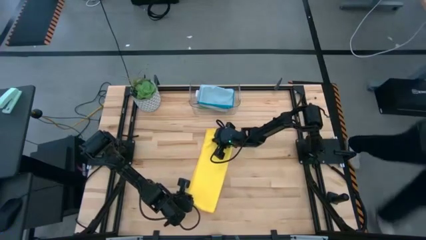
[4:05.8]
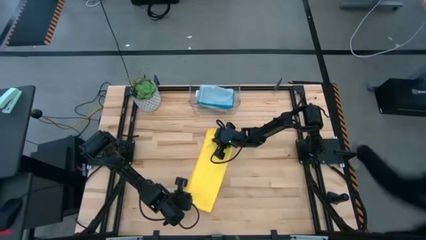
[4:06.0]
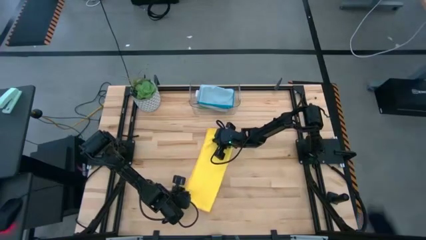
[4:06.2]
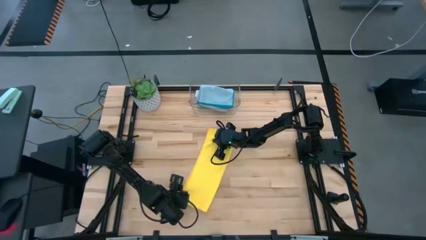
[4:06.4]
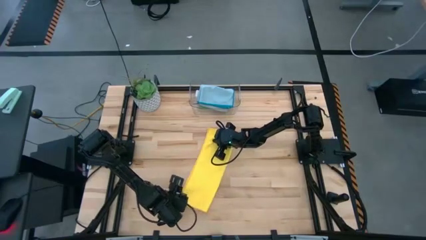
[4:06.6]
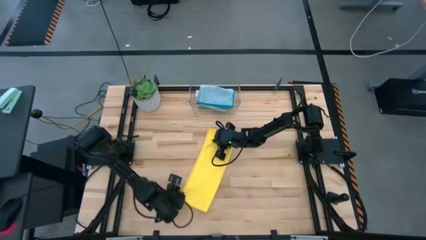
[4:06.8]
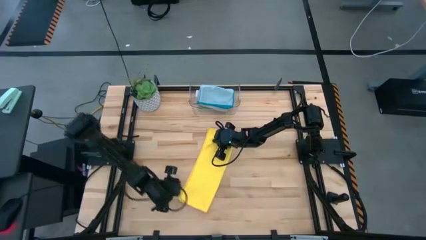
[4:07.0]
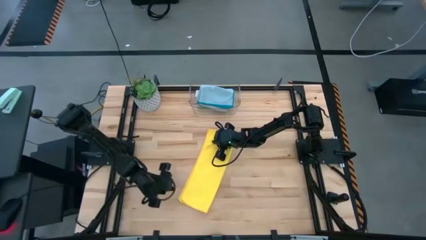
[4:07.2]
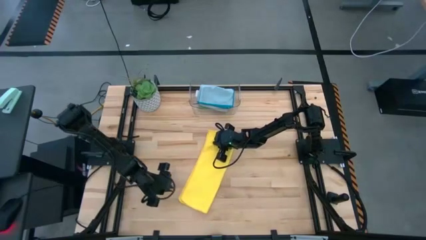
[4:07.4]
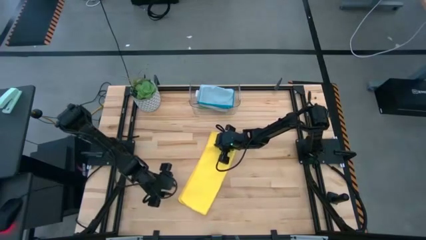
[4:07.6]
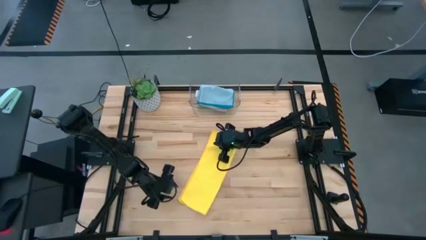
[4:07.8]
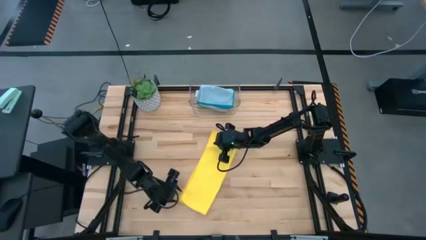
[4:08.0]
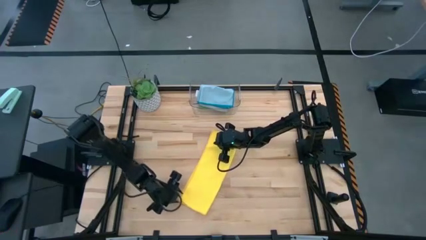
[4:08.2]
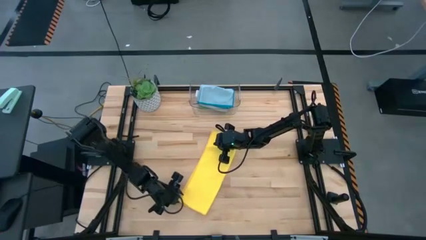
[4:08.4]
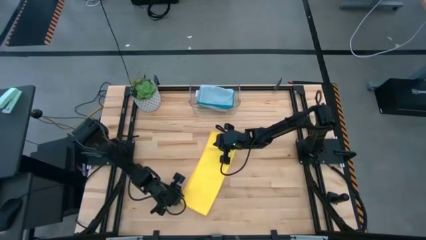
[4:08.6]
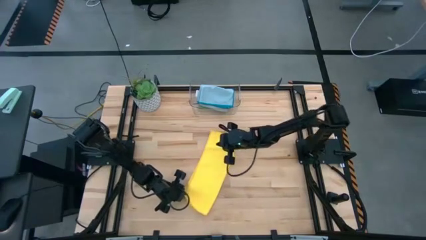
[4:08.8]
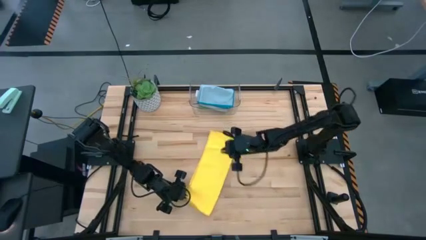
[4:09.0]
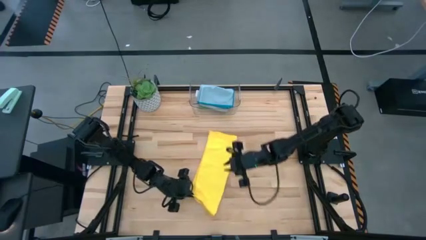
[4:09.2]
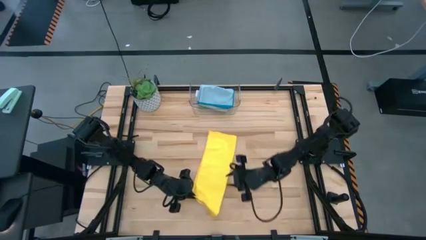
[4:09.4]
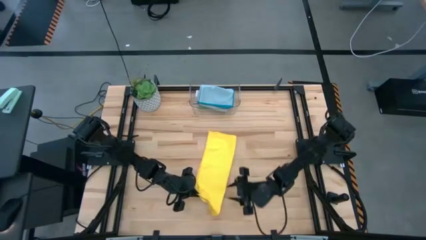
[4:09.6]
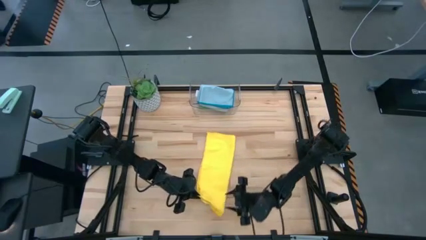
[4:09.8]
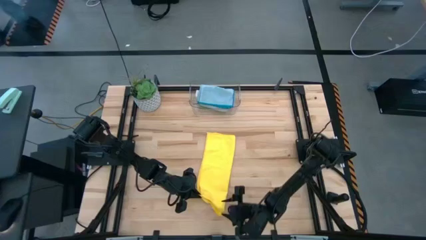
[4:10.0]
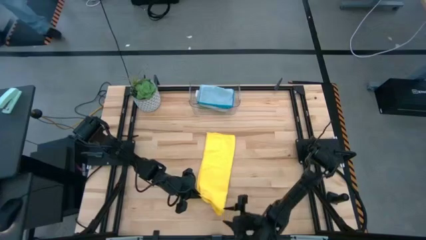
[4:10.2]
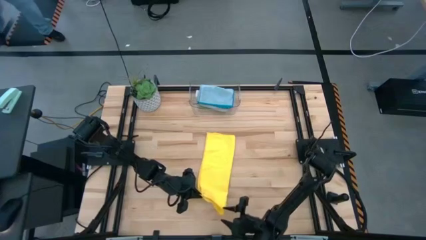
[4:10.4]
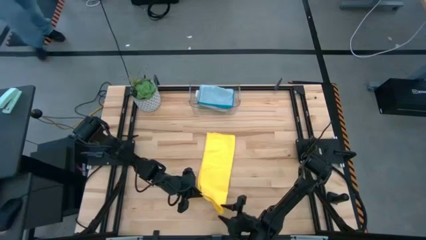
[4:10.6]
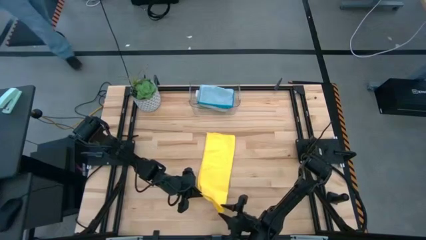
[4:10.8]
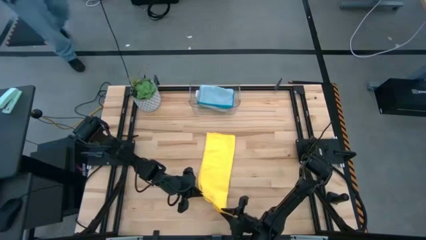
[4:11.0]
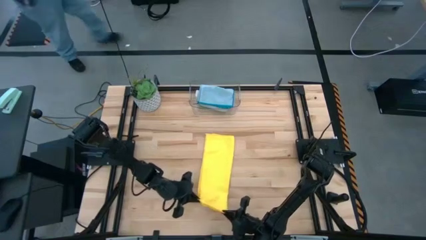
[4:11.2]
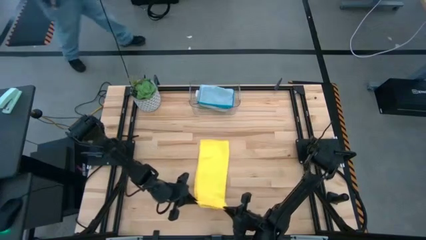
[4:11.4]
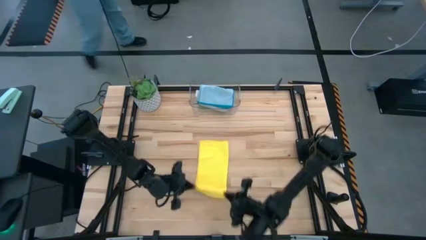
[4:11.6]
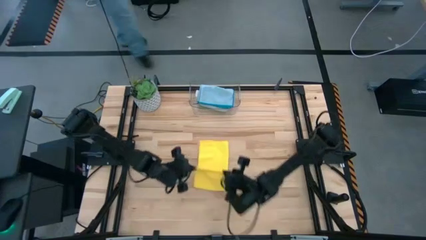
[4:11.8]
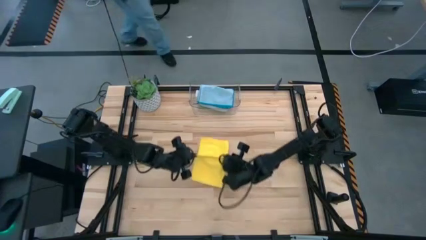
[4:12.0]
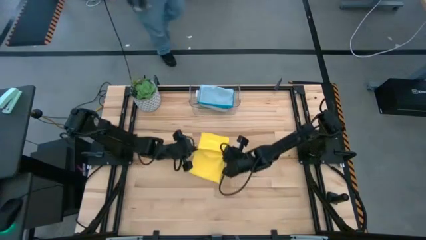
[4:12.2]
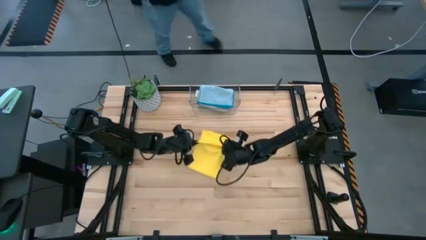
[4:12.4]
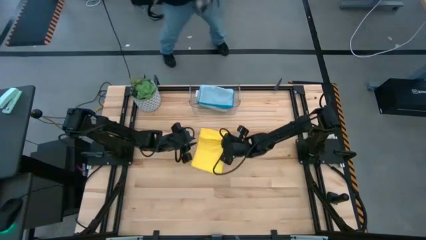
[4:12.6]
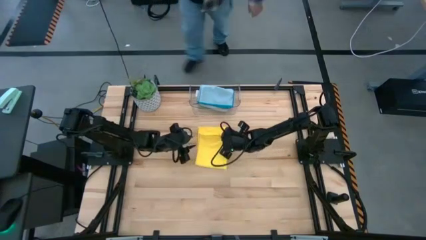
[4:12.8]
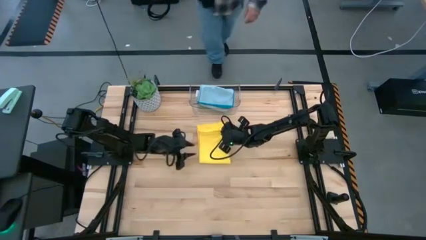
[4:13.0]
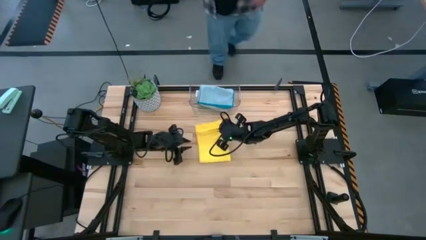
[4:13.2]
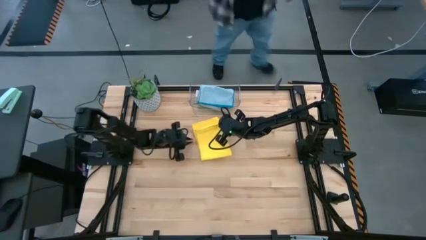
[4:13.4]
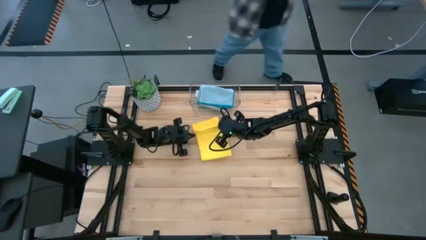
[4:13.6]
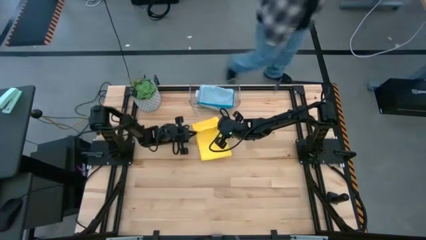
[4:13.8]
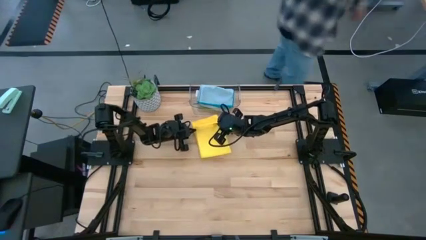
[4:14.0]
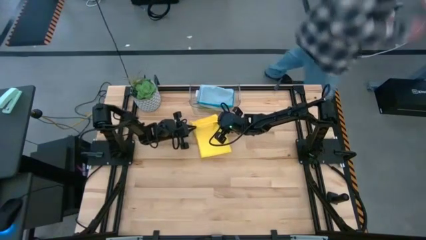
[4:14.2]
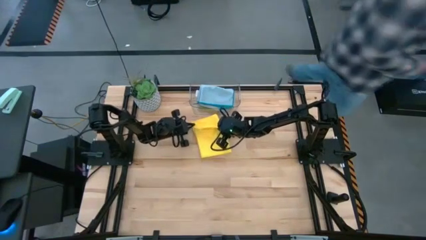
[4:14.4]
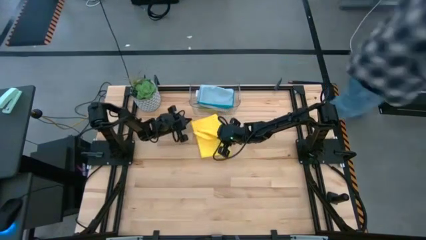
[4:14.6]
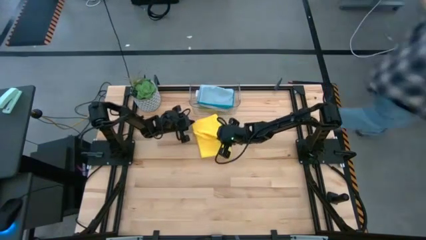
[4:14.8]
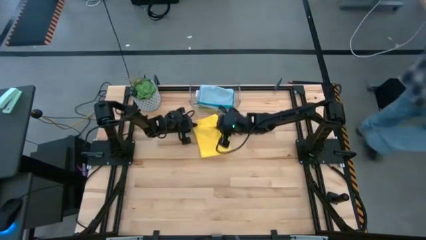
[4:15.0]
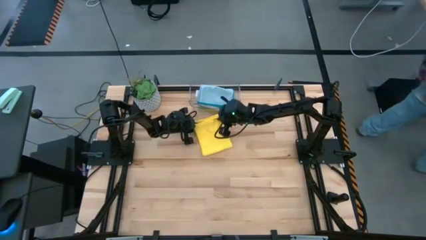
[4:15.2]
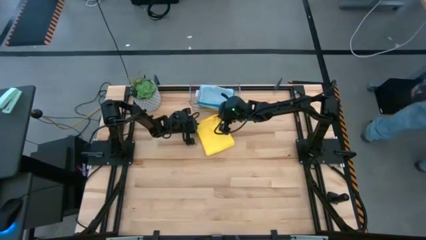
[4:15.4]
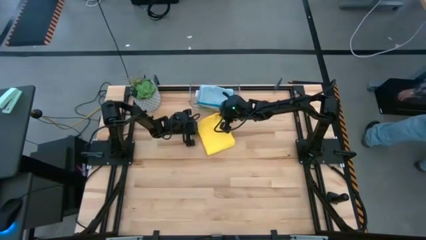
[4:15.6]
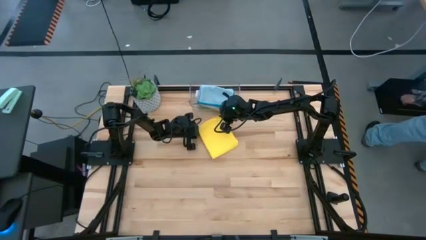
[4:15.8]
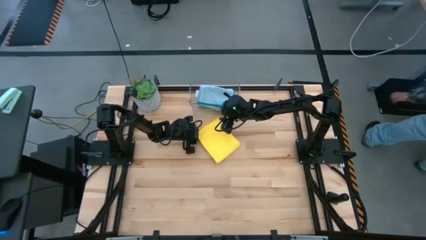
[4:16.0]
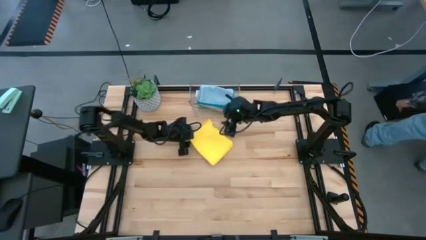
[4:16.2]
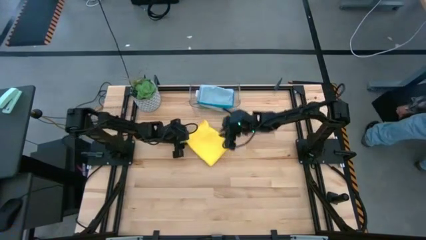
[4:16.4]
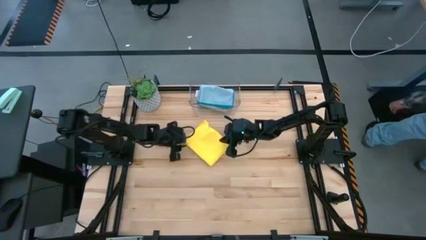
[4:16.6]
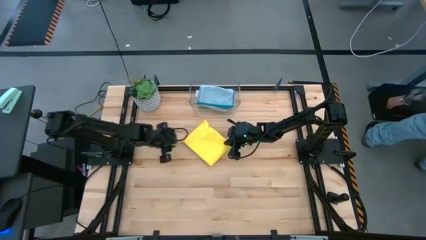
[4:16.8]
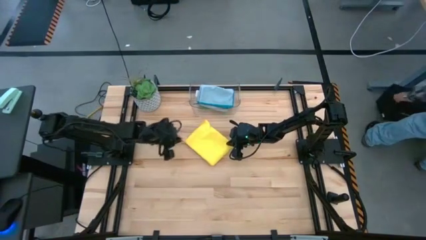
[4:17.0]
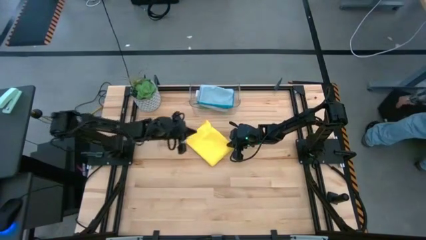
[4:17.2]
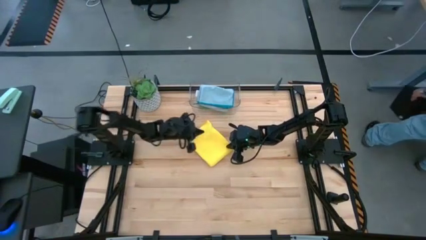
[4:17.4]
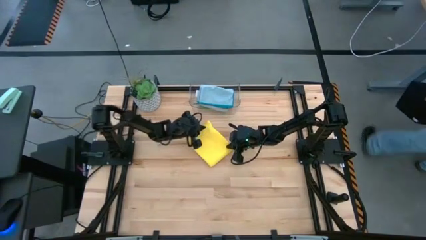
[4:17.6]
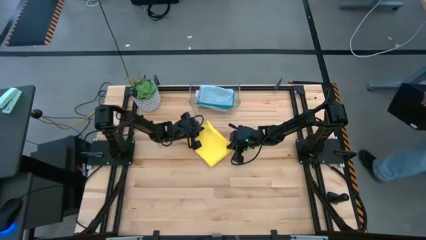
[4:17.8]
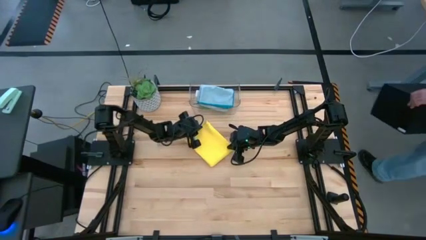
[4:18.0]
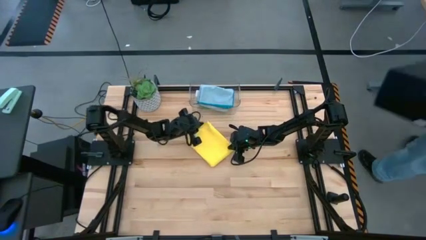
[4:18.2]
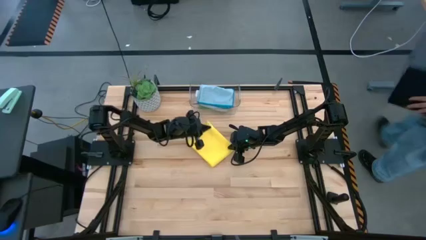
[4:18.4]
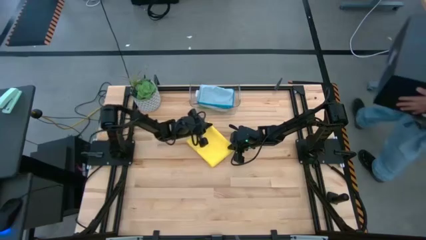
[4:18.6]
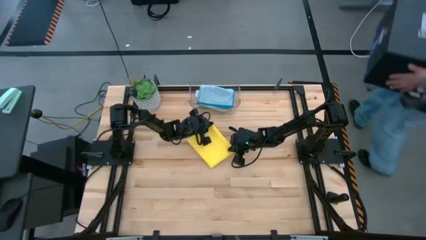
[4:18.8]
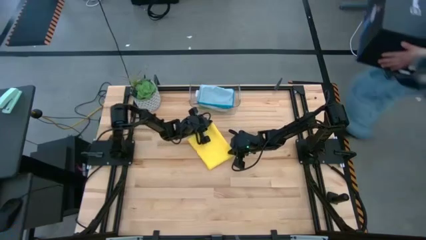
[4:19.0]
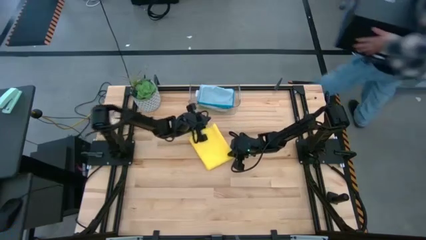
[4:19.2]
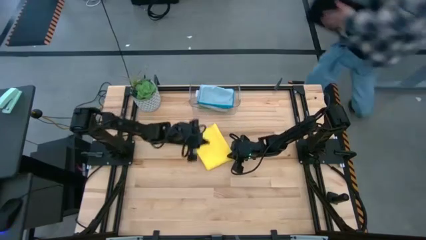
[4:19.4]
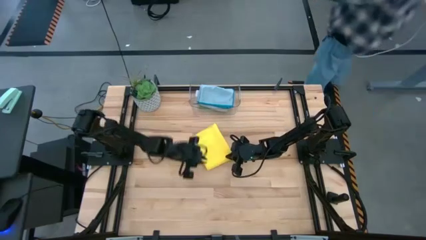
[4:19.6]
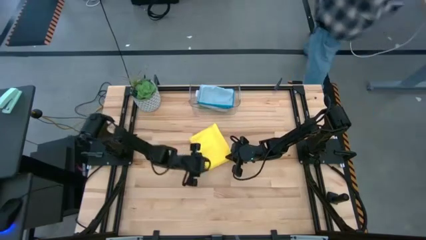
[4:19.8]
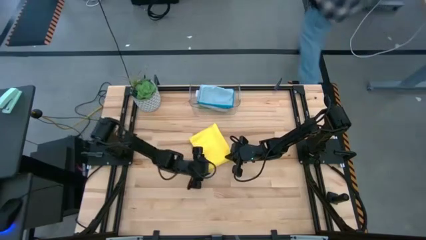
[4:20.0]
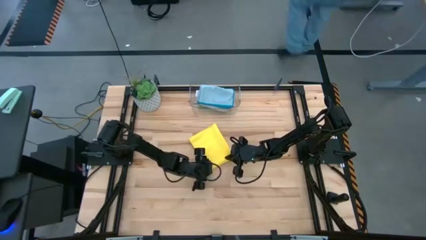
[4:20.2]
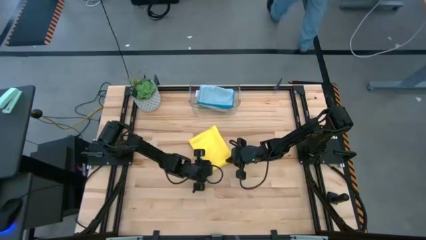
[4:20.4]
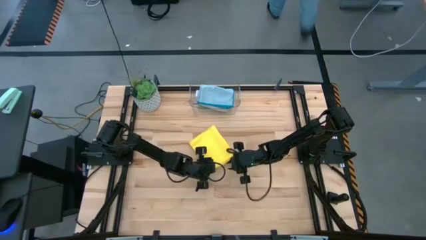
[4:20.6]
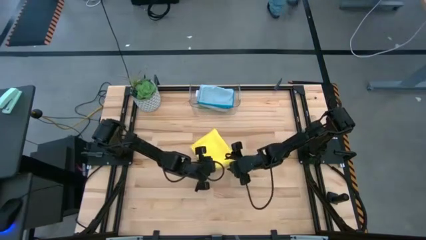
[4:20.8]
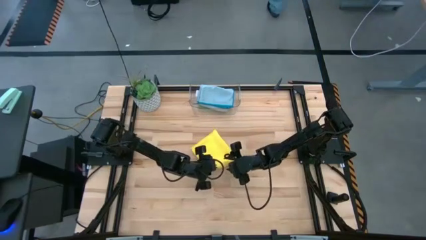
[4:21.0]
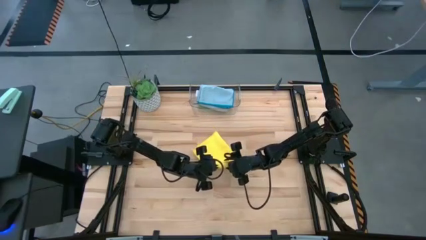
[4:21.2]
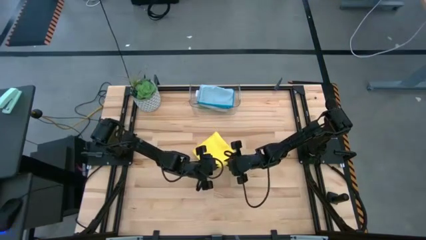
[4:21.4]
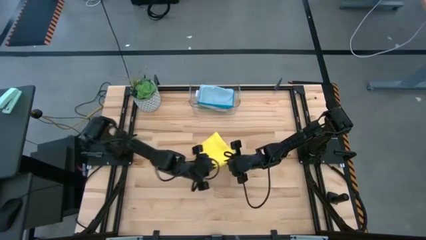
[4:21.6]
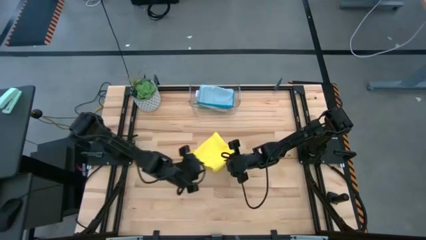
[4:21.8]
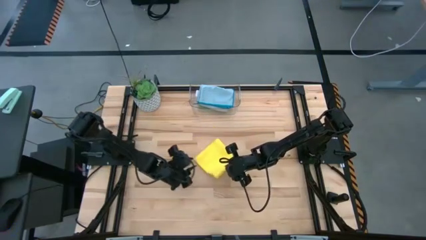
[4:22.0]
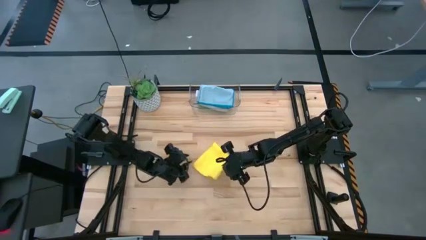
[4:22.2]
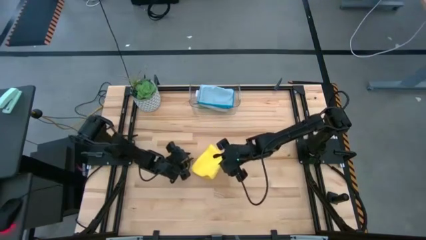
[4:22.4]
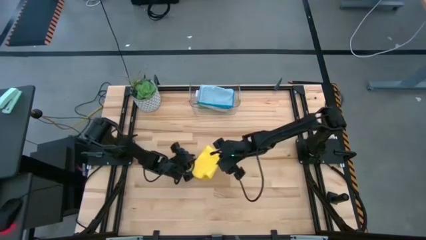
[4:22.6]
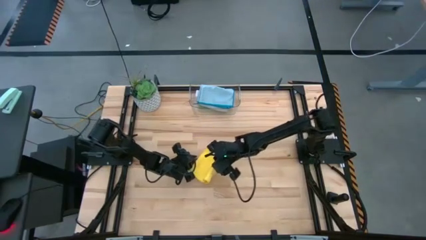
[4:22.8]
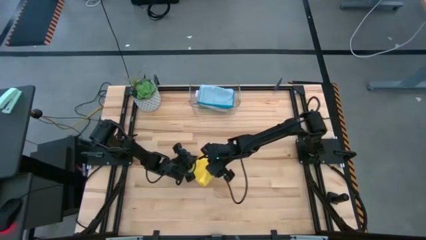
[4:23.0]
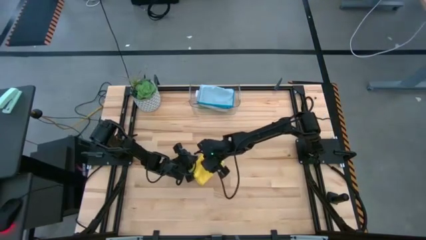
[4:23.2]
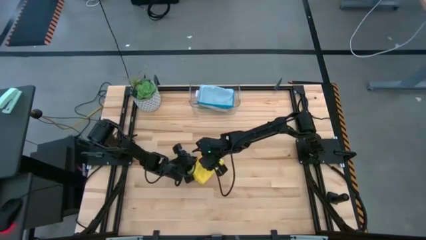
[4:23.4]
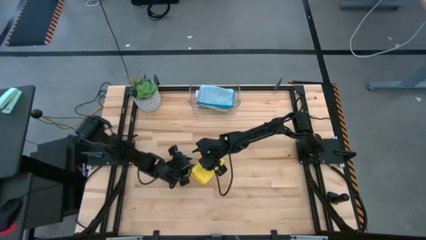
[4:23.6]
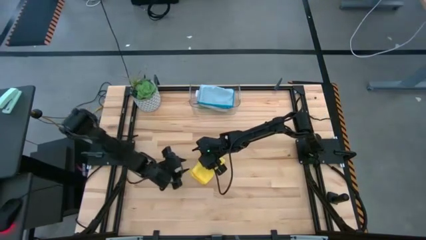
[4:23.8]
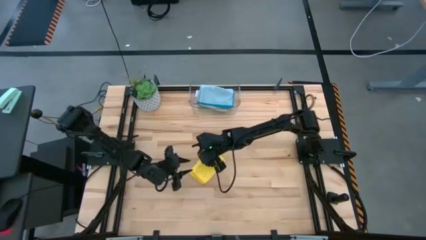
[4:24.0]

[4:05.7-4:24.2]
Task: Fold microfiber towels
Fold the yellow microfiber cloth
